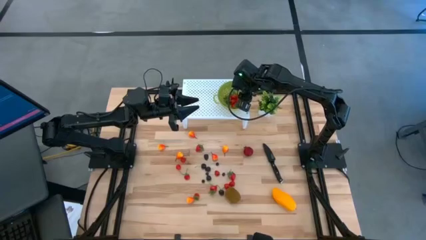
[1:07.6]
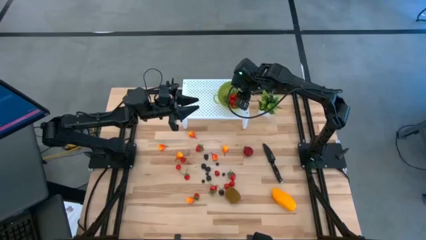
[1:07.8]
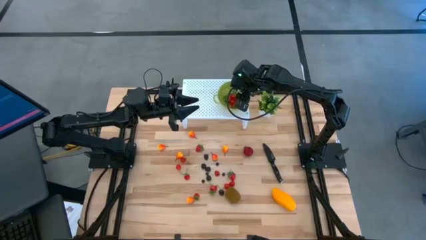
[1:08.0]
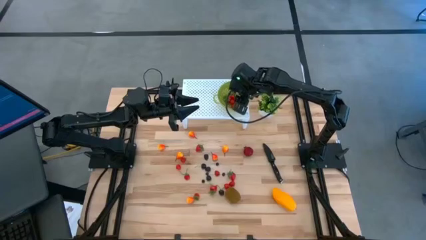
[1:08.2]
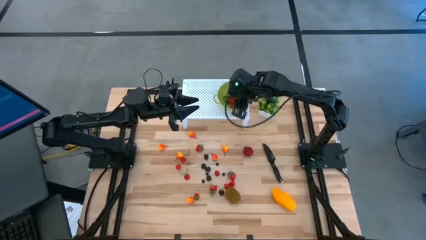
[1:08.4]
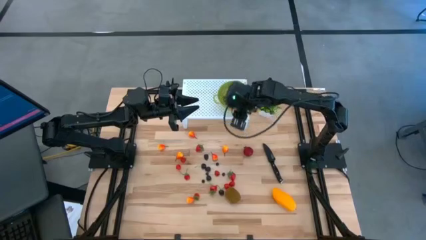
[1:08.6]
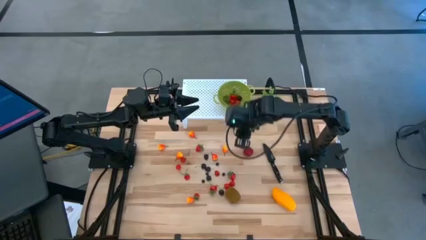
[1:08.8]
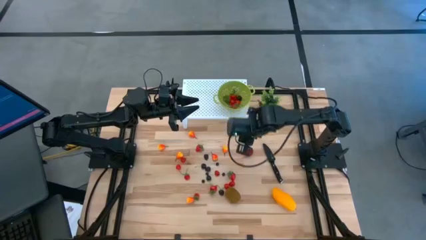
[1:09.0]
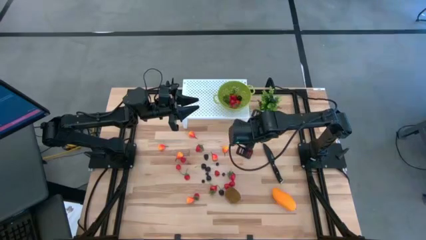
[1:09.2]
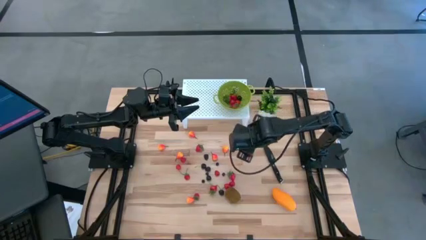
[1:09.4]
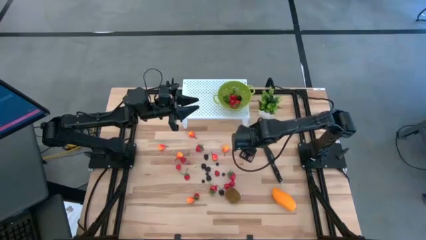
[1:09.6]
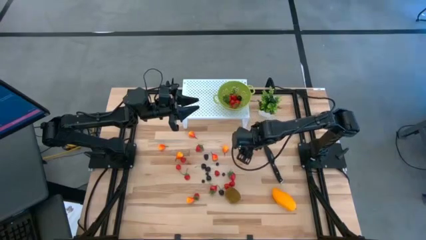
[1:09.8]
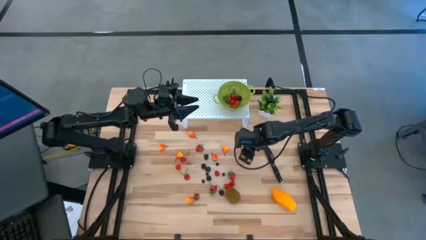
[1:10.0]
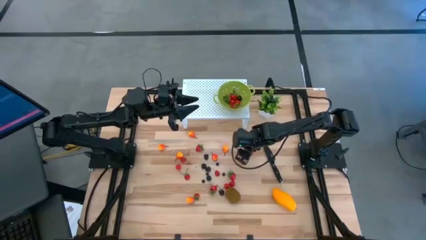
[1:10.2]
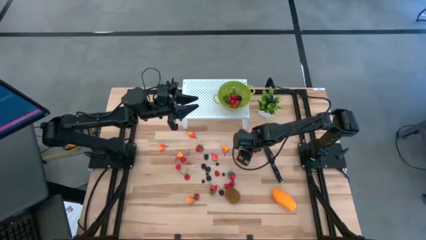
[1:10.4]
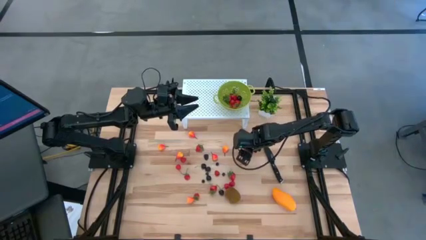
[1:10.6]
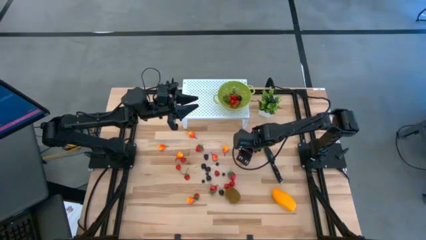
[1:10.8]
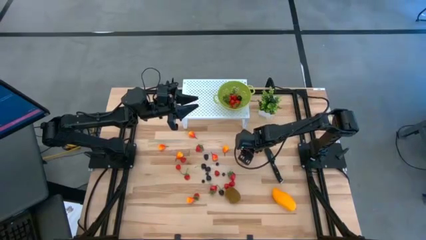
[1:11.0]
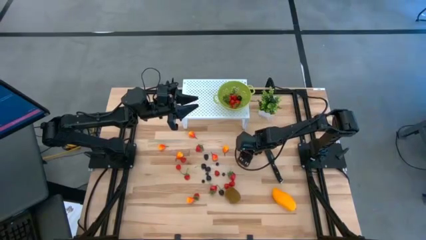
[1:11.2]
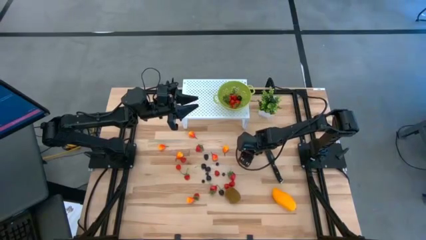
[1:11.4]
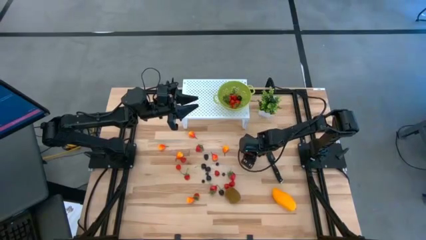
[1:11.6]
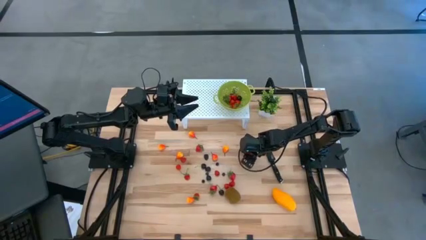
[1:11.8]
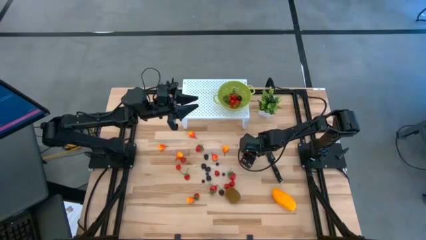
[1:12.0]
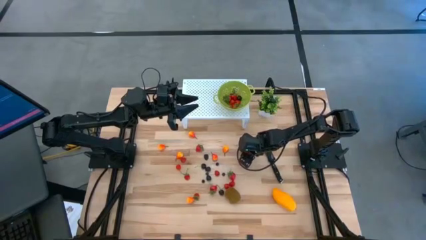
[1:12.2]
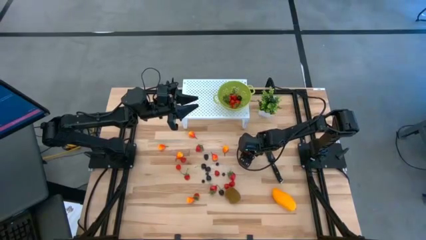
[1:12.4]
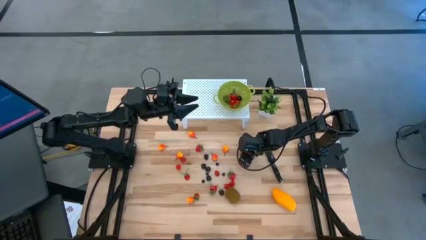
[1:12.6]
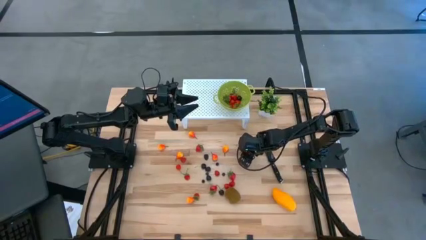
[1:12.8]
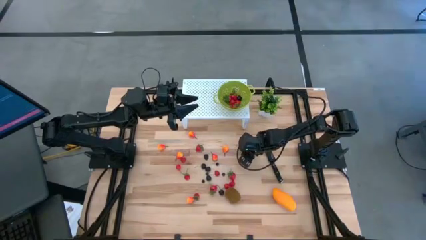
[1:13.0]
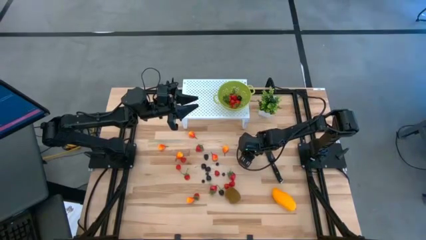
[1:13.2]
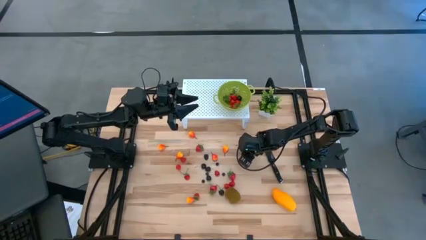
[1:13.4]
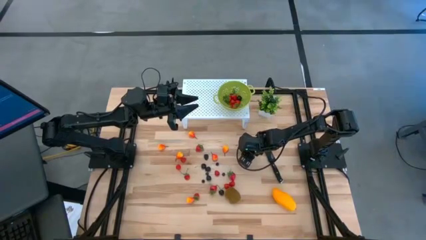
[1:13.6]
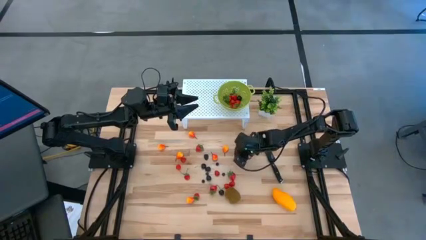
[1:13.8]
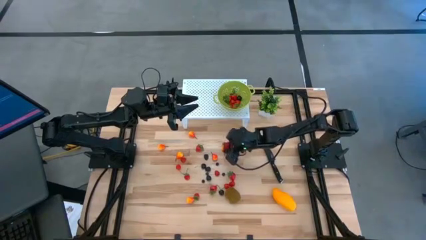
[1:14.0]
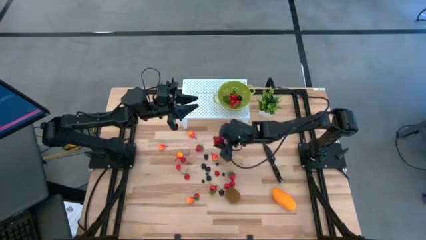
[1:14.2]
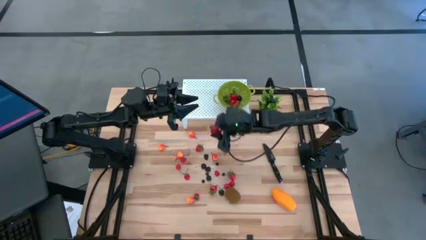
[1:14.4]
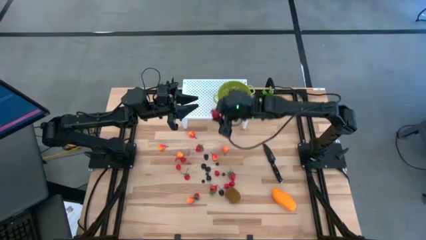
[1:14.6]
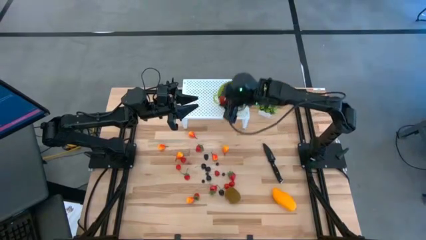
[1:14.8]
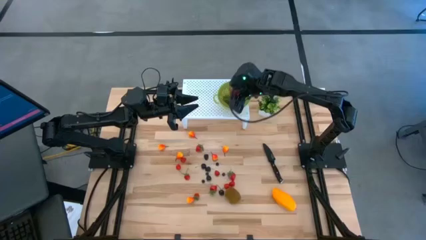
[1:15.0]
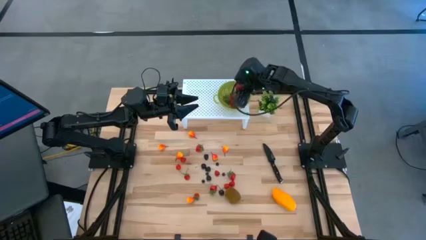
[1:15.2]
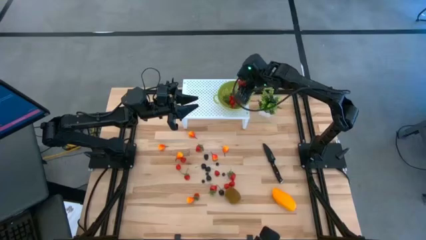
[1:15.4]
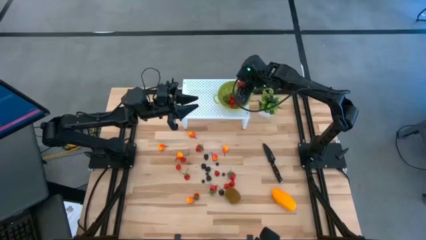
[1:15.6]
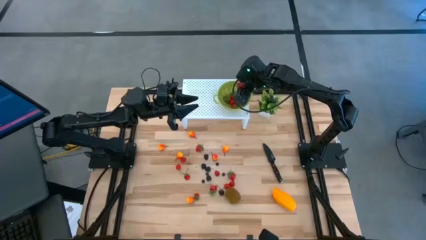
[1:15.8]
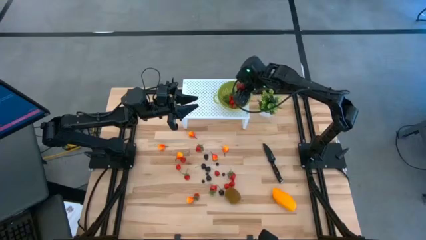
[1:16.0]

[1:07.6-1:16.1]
Task: Pick & Place Fruit
Put the red pomegranate into the green strainer bowl

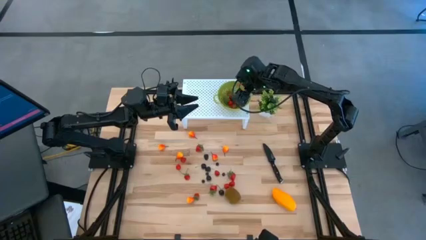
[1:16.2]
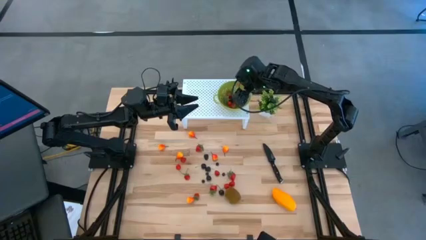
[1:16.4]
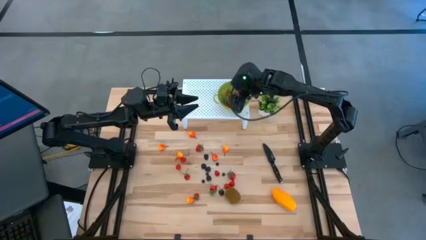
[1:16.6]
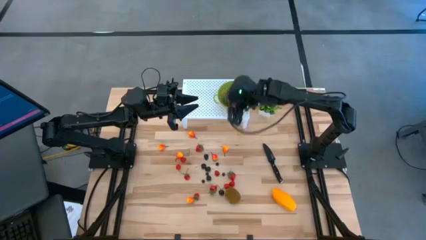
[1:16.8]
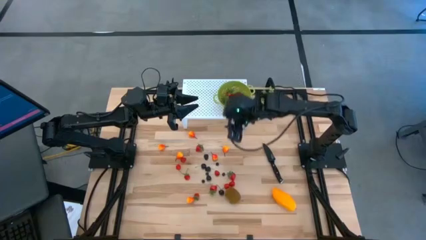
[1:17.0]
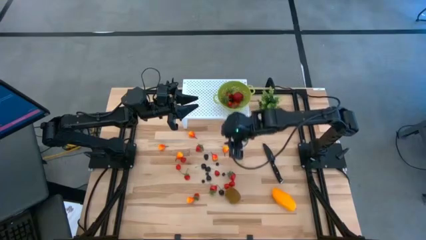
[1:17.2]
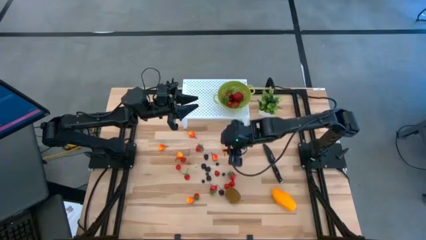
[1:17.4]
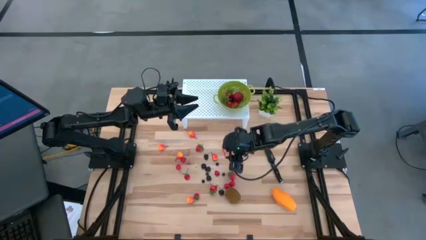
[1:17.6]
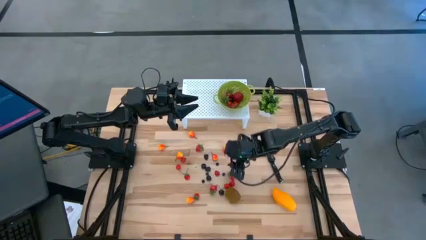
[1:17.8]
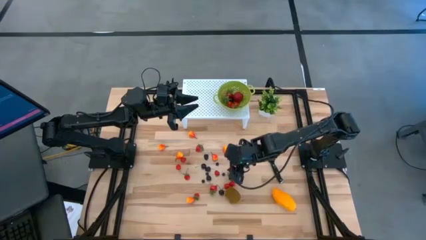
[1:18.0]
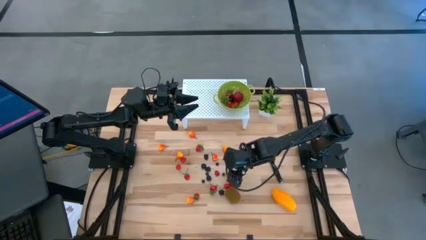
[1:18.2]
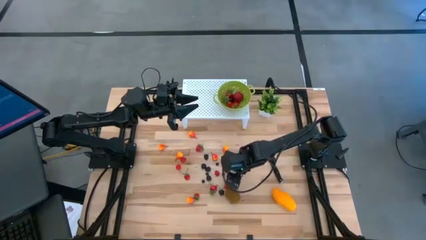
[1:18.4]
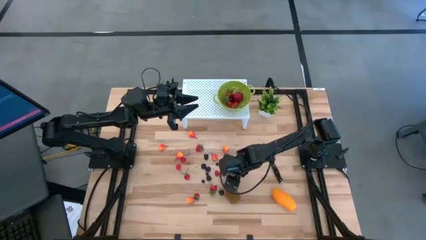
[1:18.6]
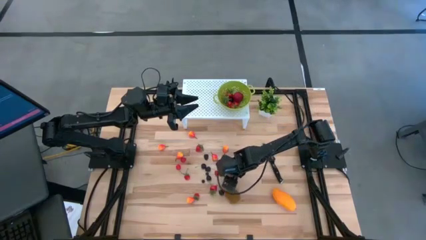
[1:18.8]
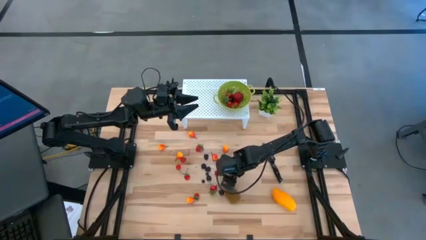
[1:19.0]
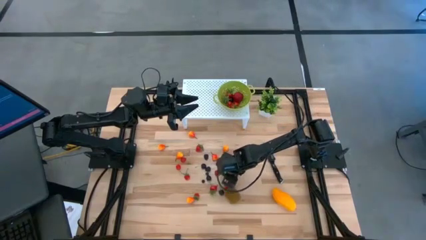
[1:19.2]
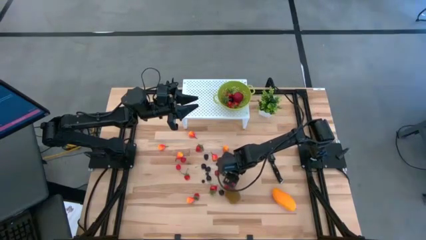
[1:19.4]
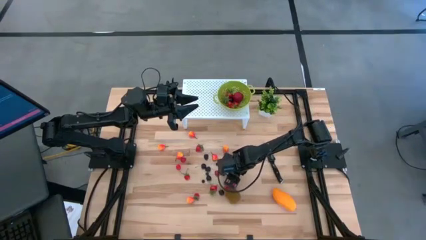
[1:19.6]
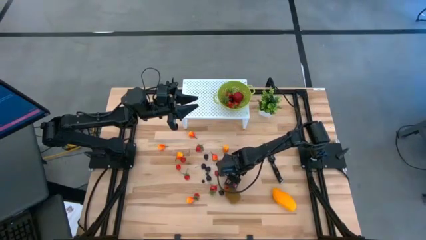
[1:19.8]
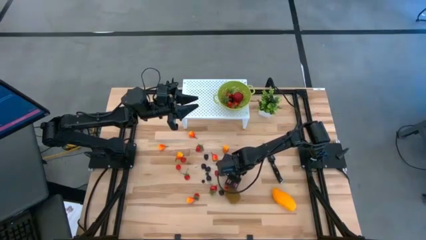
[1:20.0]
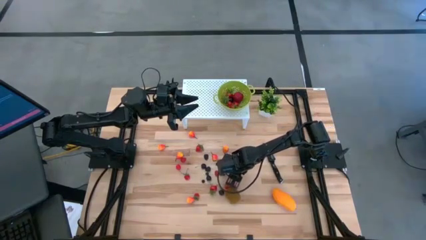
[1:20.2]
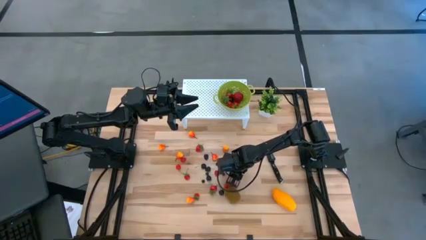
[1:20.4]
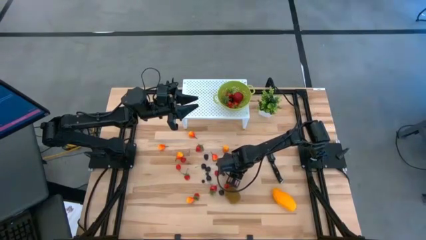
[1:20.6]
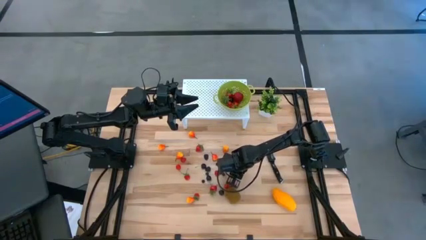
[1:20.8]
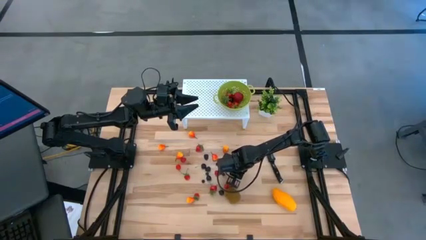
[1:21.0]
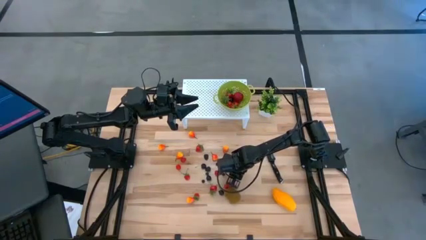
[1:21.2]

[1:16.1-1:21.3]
Put the red strawberry into the green strainer bowl

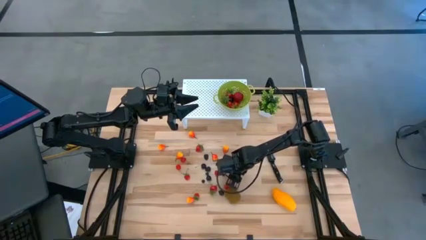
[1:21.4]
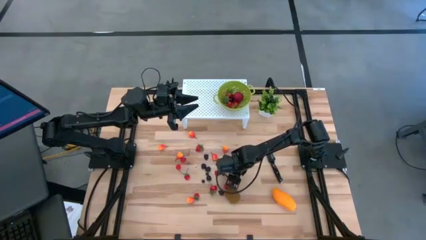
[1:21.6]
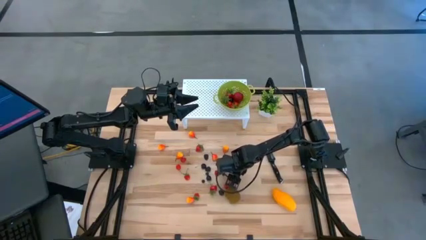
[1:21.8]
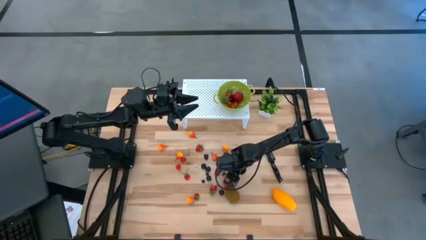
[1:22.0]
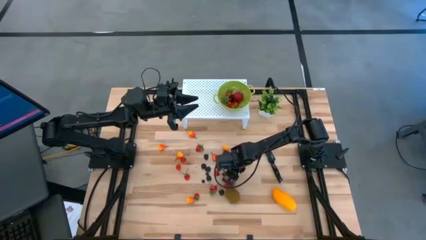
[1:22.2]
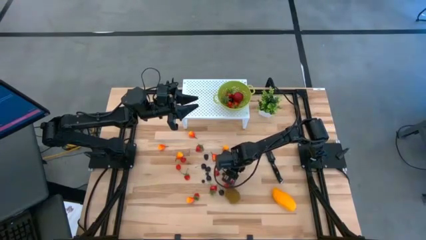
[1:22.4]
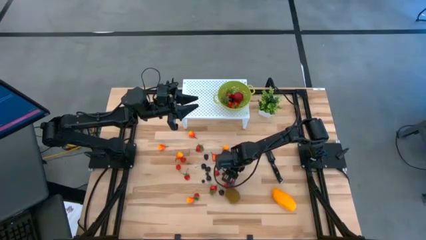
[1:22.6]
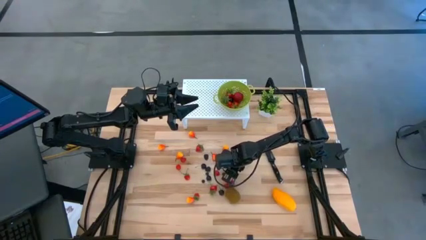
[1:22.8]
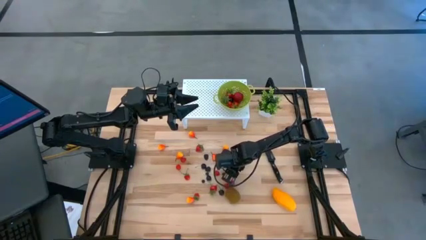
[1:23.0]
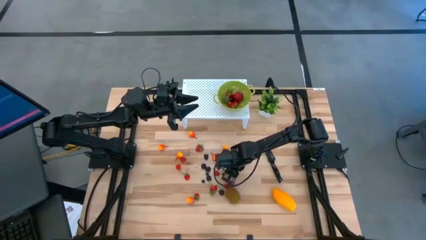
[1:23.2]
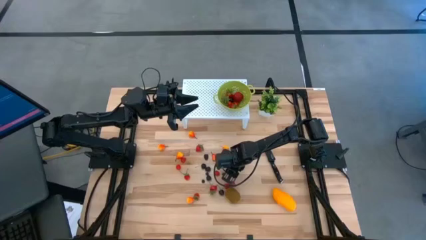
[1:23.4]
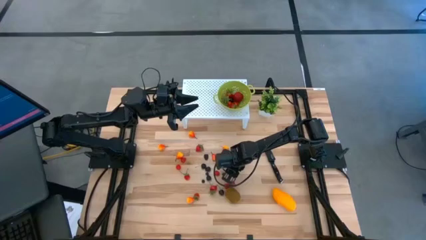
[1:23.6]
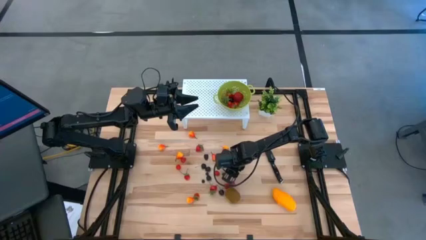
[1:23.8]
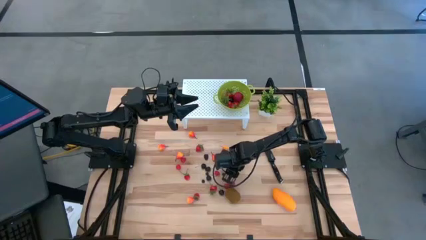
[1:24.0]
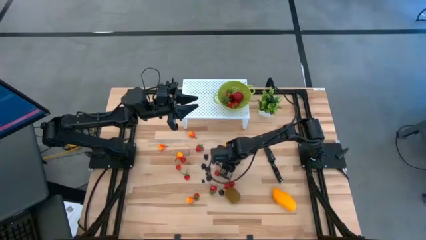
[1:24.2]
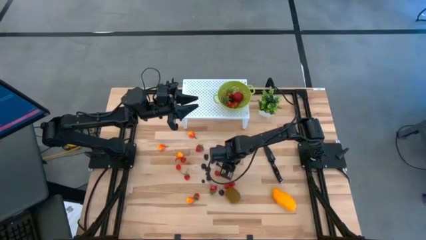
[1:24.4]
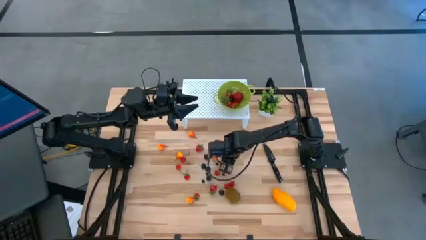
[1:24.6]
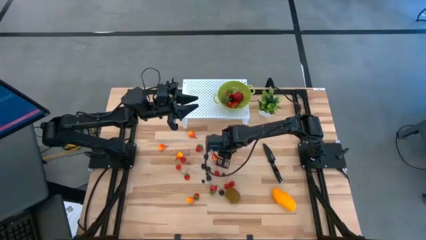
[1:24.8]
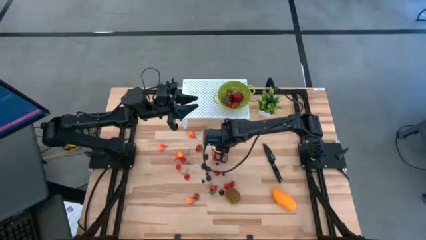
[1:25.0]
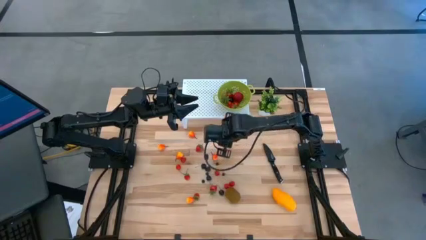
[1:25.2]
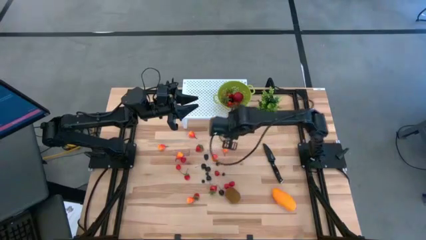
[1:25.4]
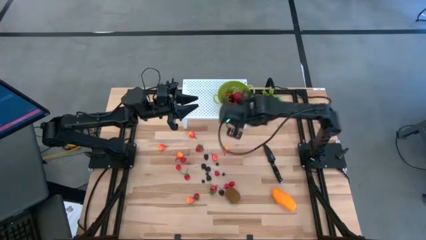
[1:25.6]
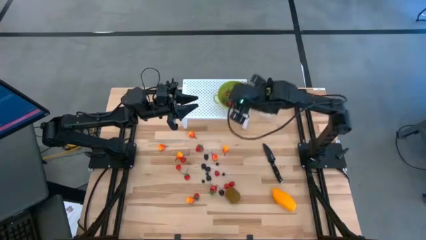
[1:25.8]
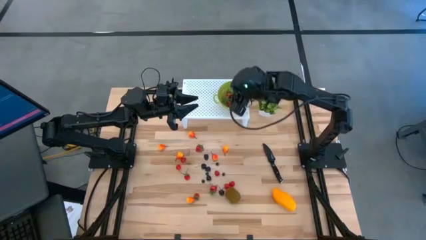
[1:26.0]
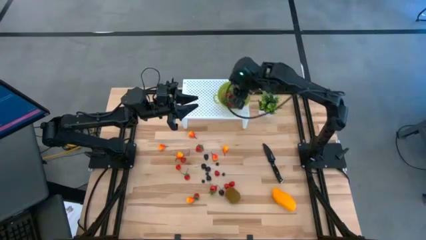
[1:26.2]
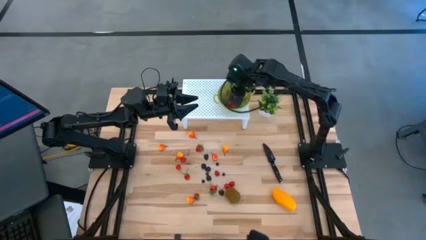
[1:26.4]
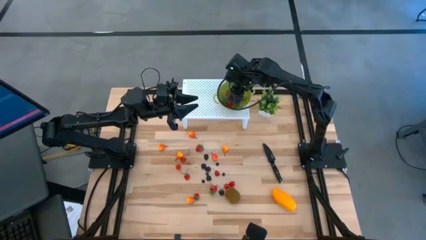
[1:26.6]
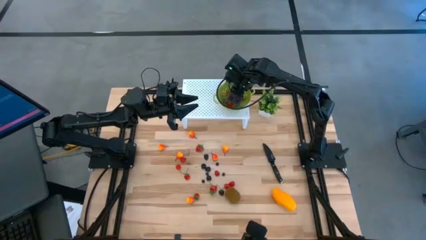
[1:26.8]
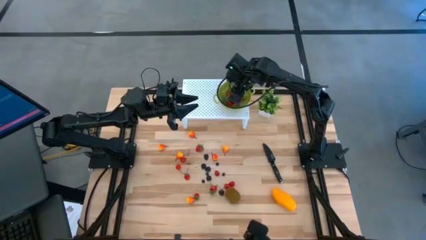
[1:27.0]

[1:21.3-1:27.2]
Put the red strawberry into the green strainer bowl
